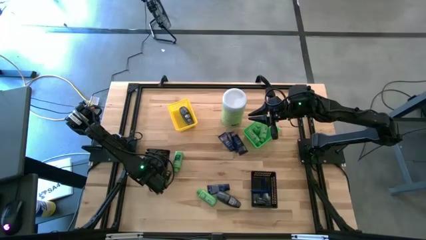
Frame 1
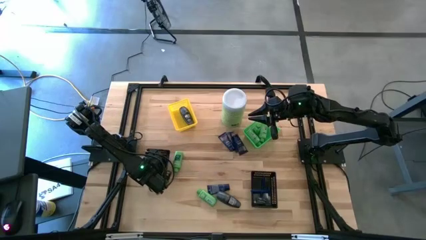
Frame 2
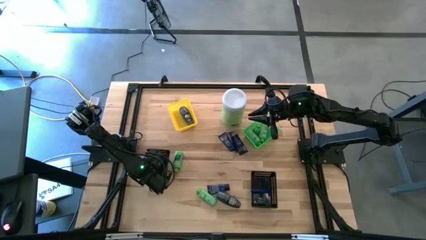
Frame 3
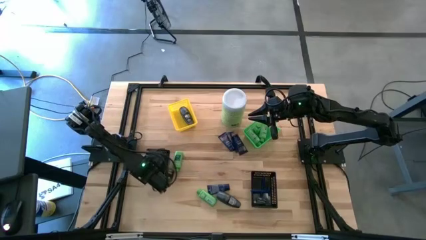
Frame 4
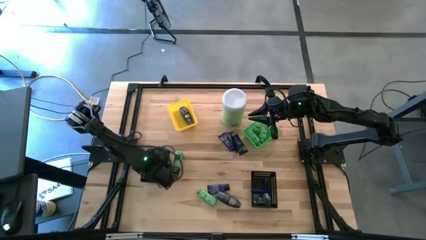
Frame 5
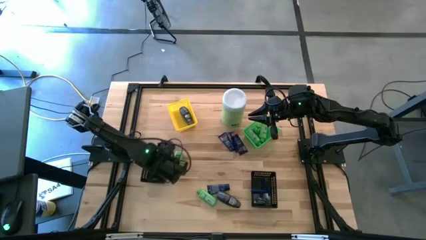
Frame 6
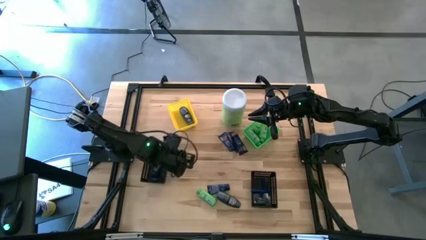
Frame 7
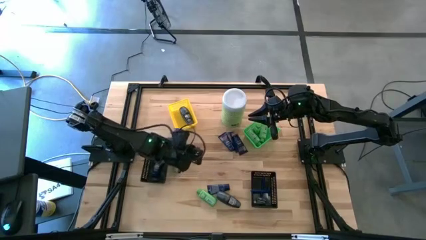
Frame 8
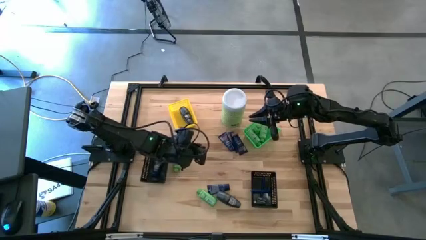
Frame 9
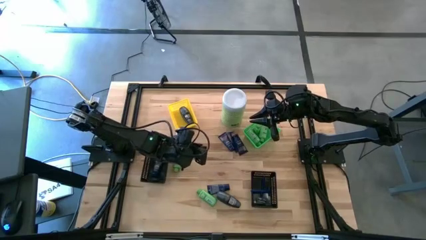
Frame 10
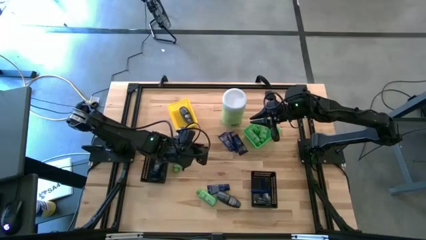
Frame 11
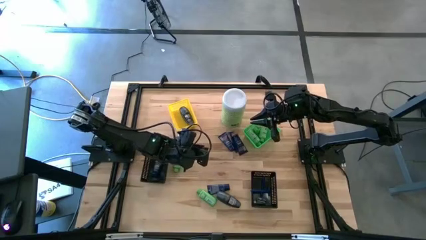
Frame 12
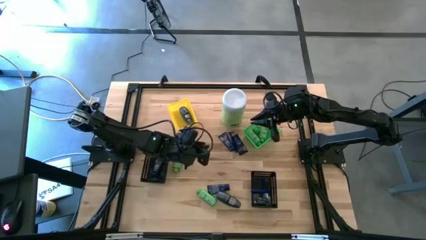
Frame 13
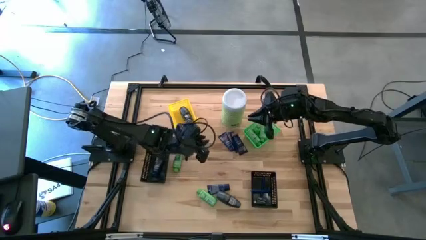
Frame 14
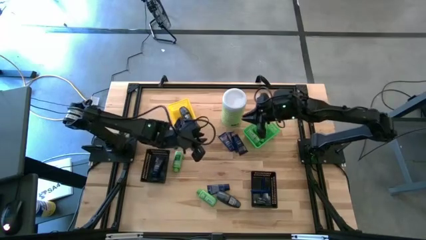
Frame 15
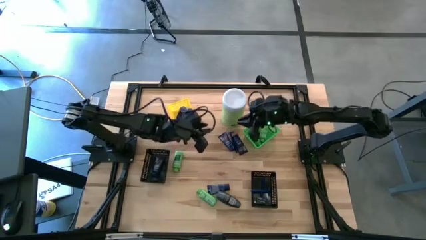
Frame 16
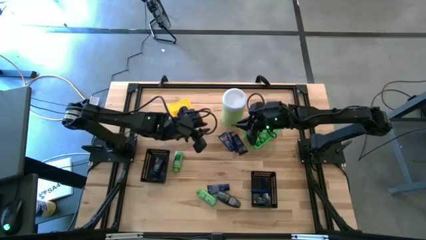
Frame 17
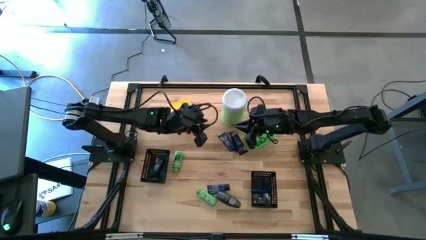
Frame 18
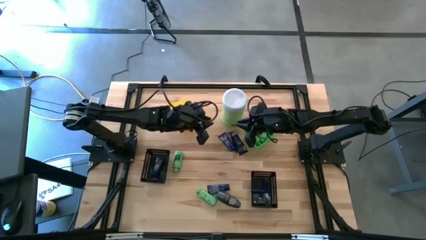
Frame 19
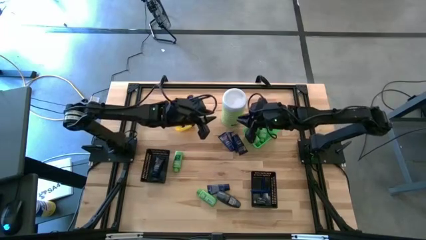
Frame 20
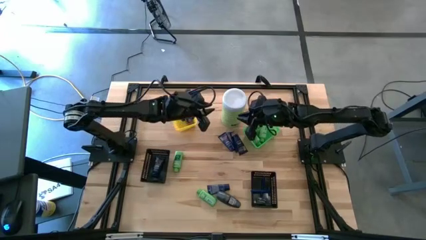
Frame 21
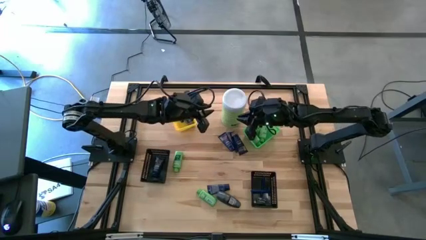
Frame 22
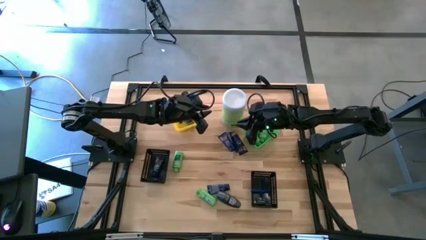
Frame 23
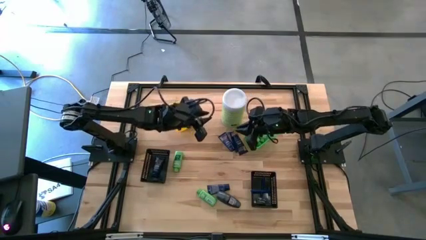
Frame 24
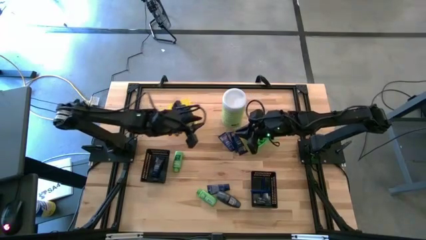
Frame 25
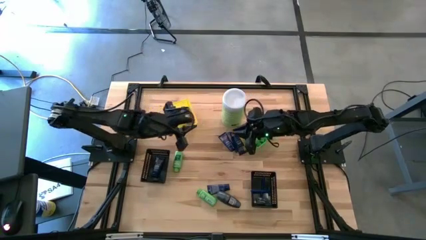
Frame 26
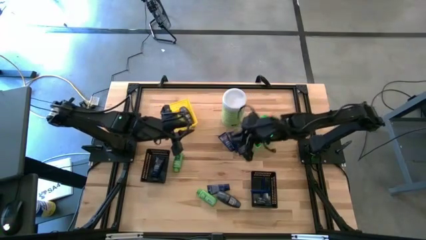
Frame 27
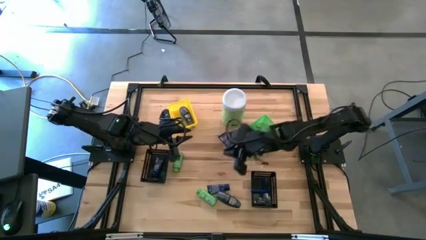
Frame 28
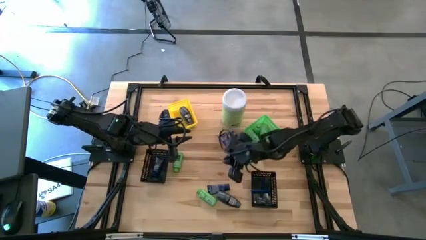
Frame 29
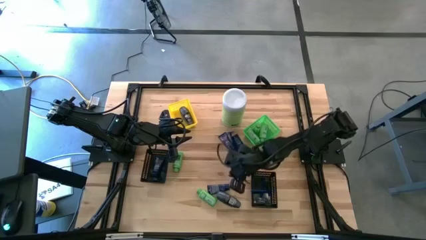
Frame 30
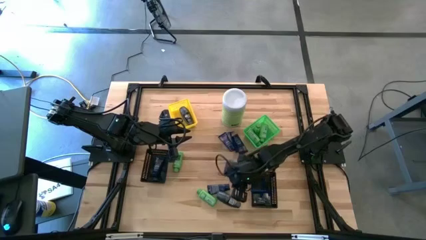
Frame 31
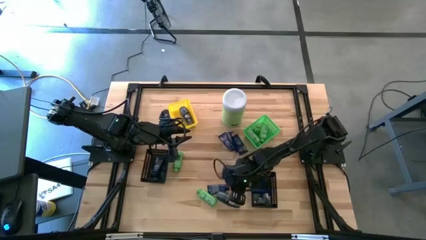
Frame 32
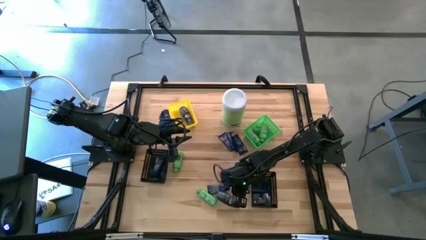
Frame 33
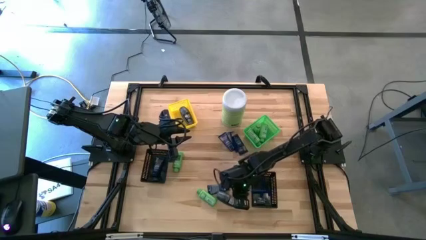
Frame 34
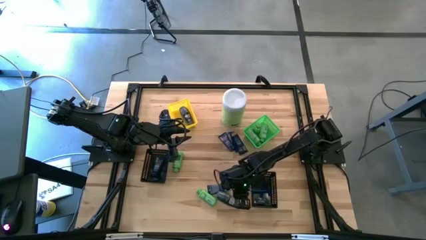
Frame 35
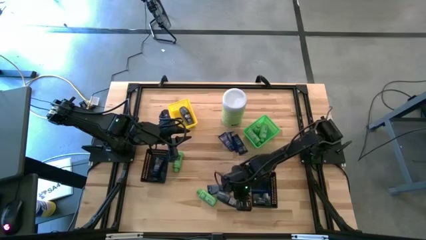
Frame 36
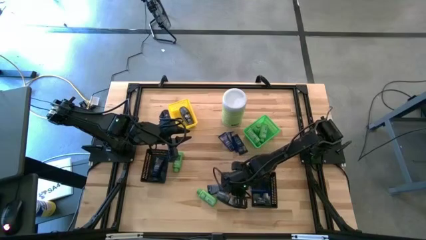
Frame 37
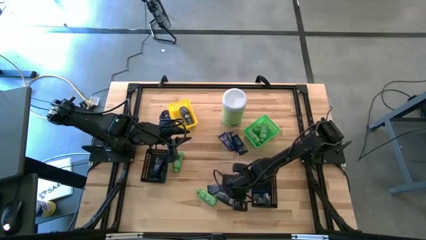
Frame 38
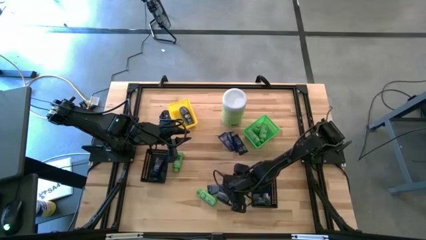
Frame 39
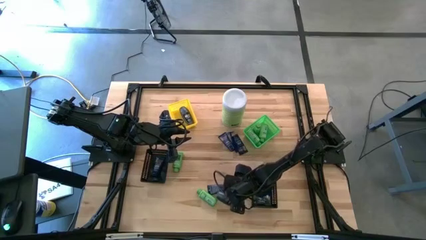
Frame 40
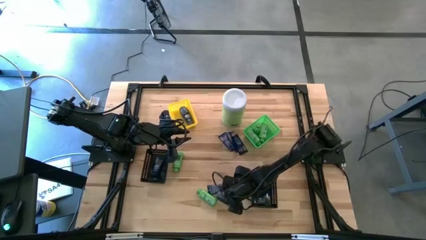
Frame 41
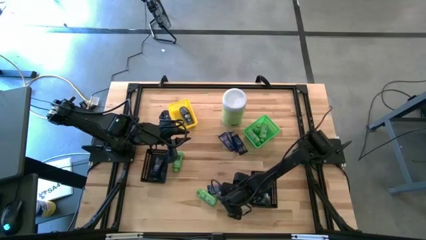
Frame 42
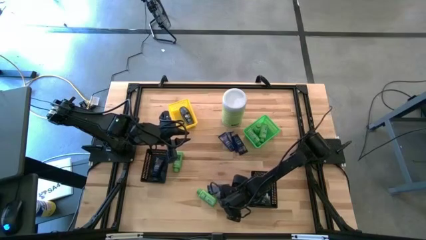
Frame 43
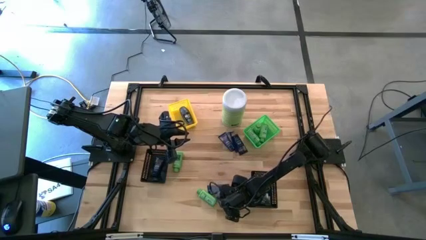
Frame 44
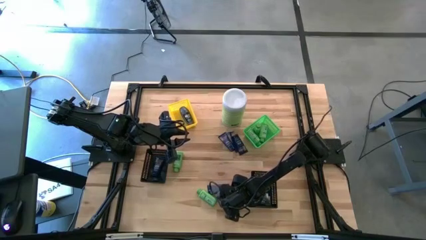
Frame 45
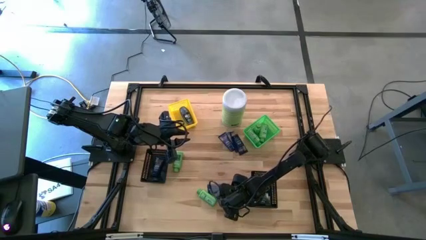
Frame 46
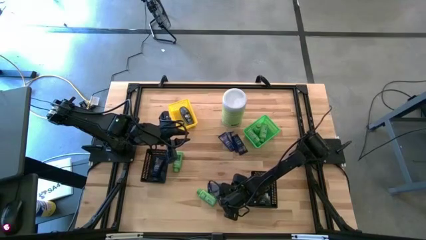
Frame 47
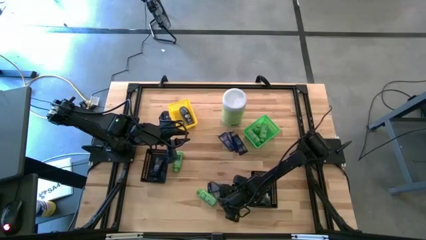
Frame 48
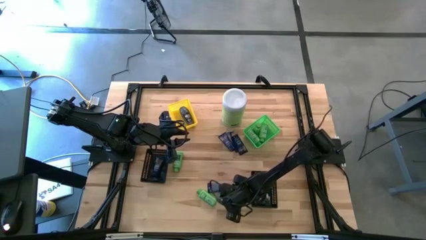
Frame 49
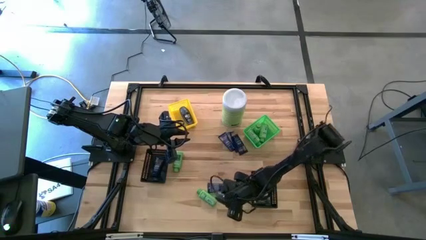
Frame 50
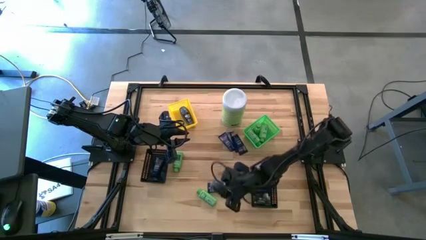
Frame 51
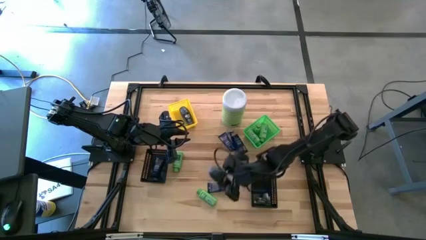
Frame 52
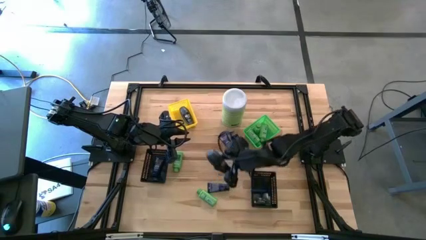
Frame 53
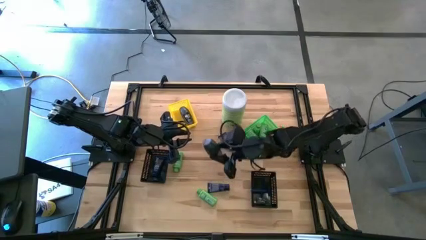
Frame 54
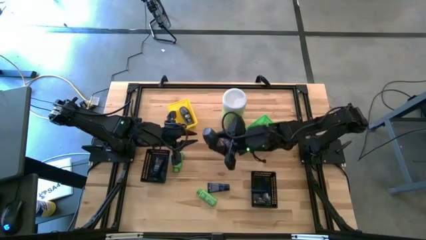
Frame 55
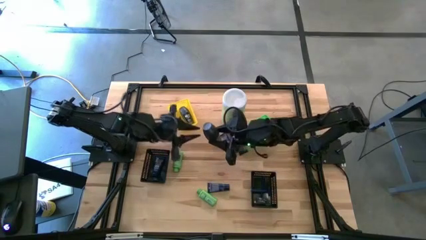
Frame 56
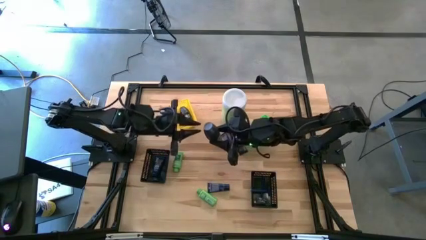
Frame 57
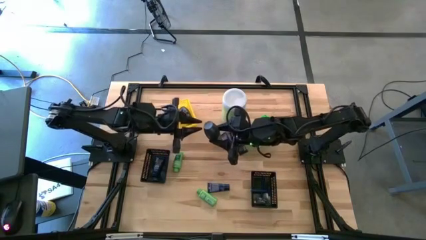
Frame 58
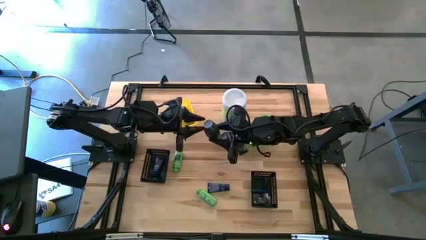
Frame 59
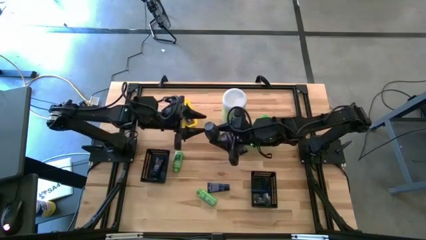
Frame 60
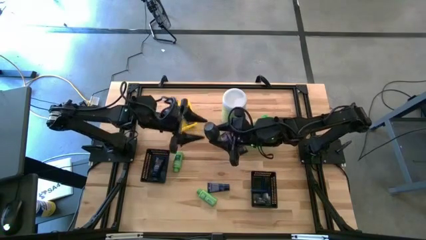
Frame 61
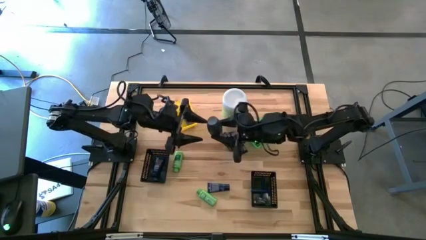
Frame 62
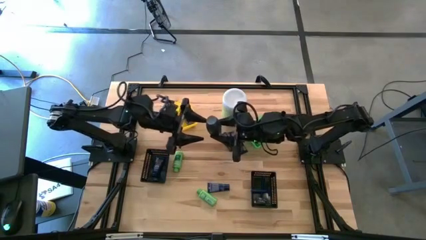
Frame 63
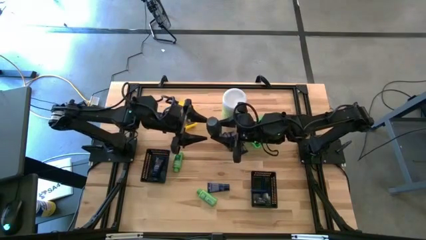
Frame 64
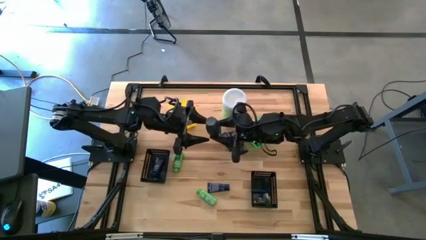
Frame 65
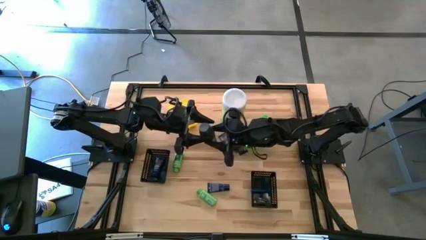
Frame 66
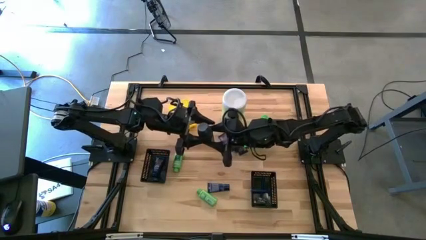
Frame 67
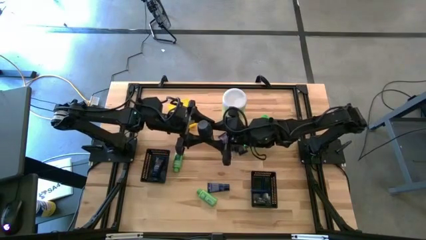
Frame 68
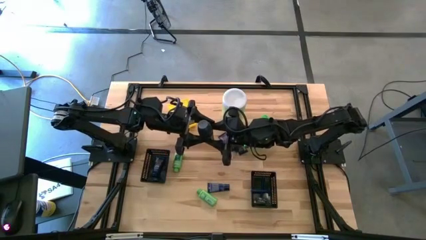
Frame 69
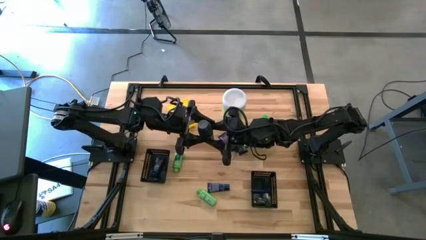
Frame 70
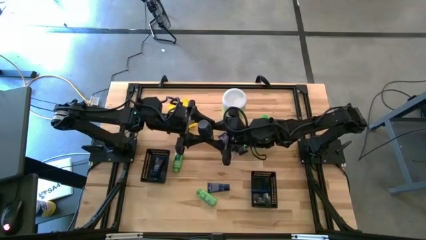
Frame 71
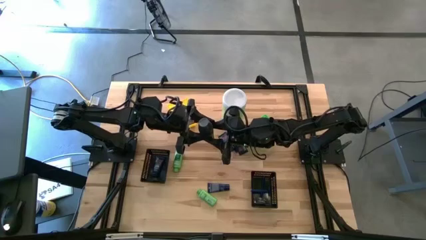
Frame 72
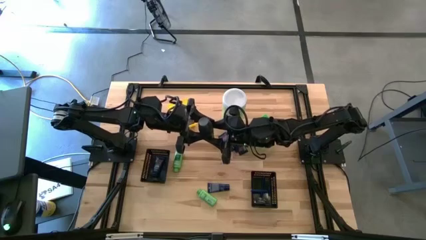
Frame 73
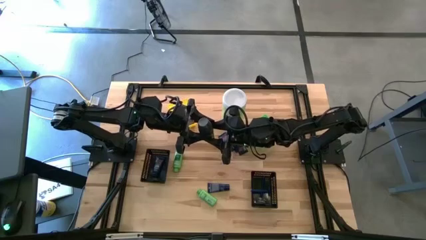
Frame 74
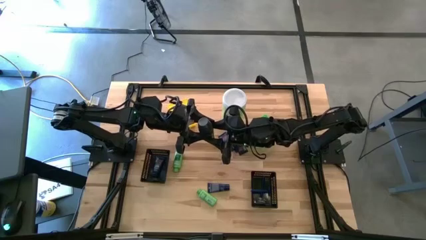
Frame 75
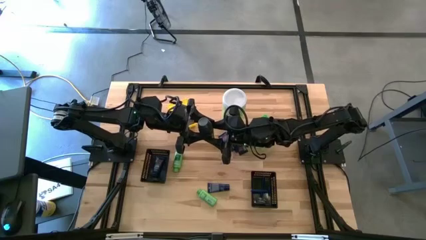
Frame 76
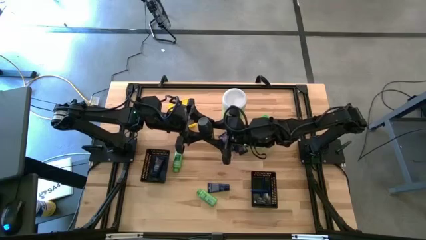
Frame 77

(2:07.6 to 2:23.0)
Task: Pick & Place Travel size toiletries
Put the deodorant into the yellow bin

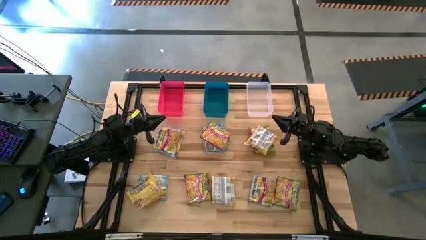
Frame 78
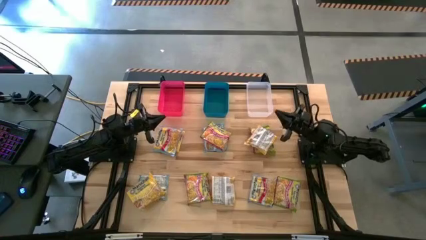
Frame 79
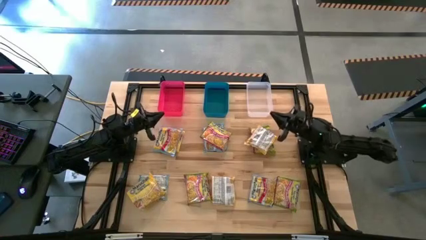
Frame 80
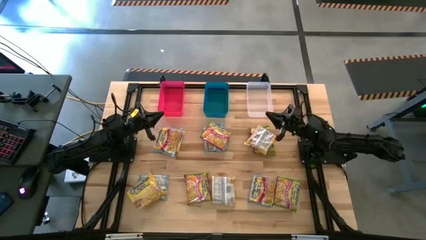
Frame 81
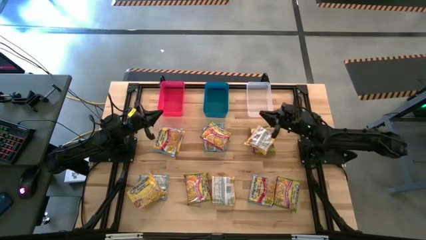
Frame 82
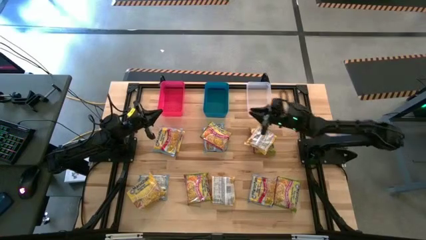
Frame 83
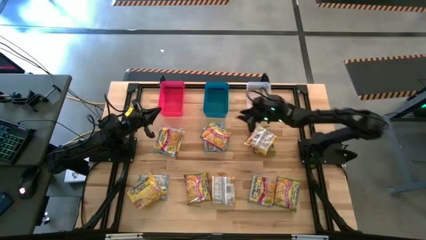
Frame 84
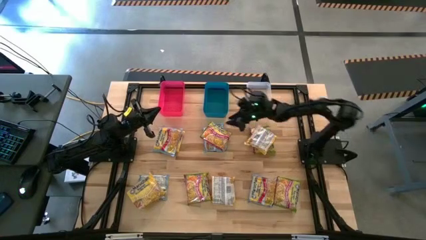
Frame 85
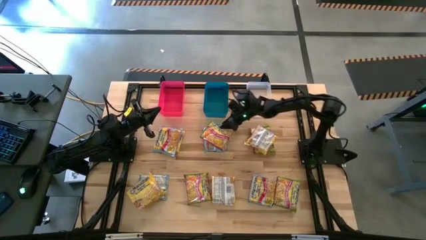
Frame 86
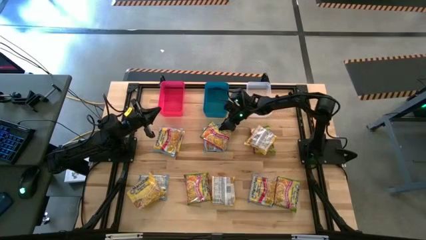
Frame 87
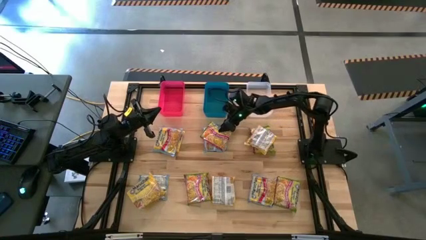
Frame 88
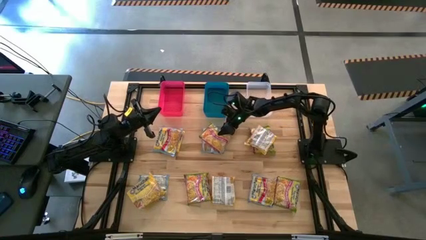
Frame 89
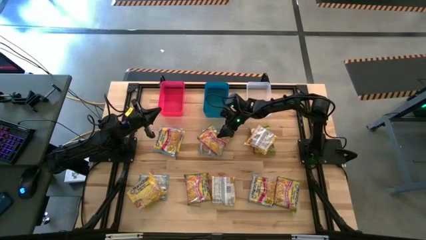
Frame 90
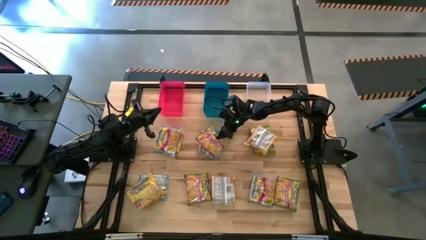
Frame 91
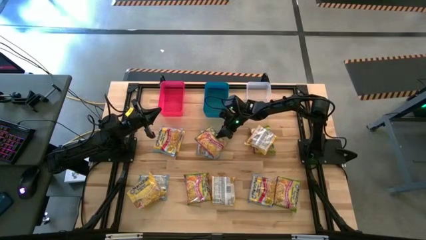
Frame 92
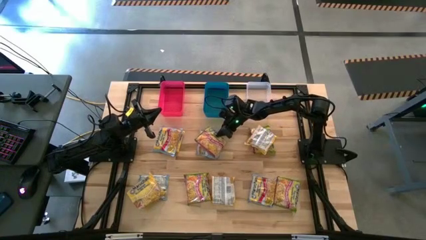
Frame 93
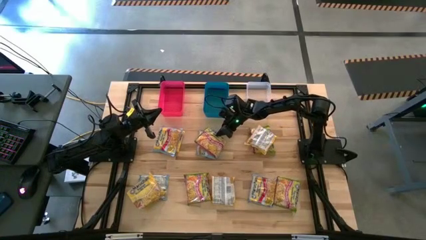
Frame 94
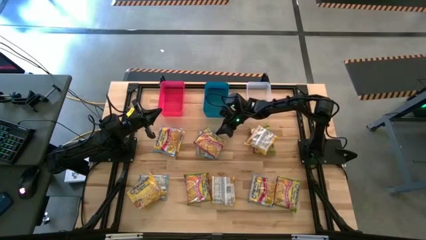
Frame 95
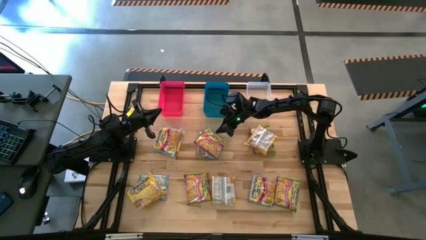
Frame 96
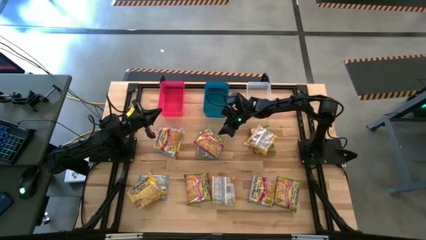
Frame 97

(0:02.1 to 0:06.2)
Task: Sort Maruchan noodles
Put the top left green noodle pack into the blue bin
